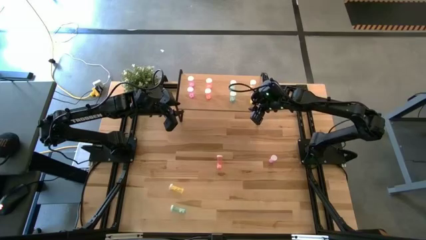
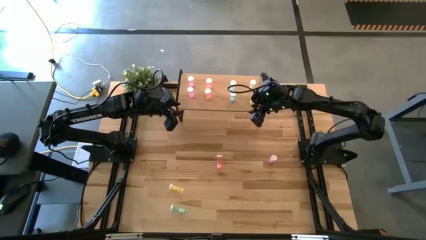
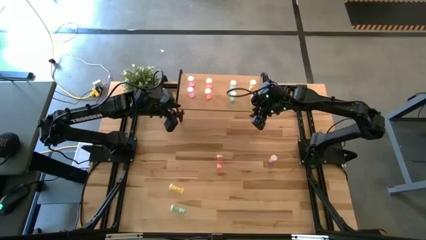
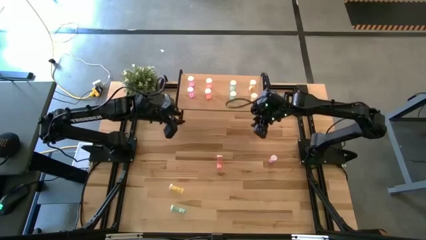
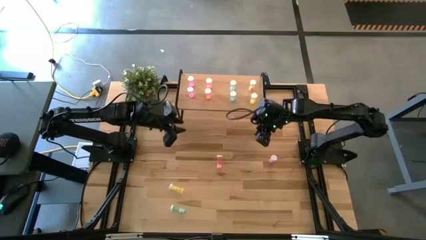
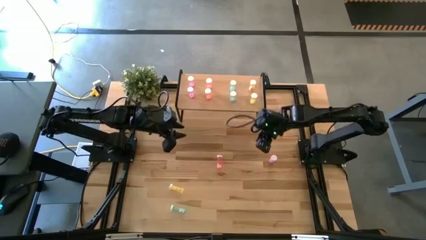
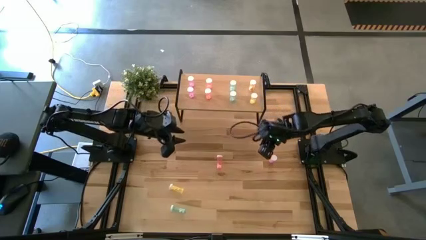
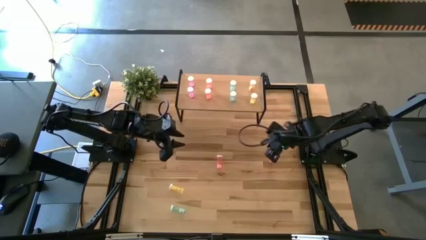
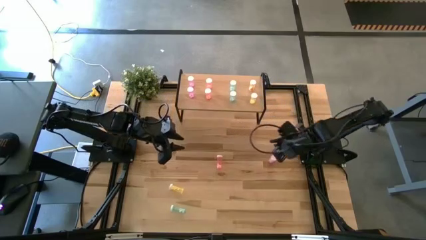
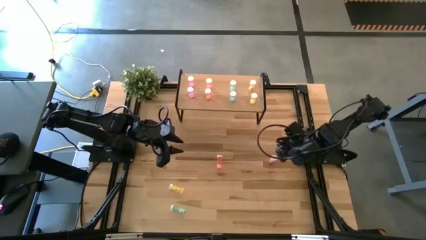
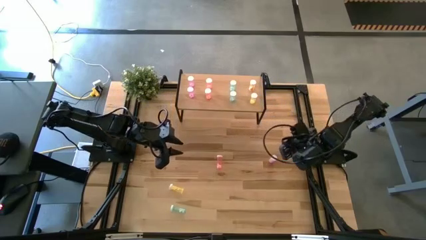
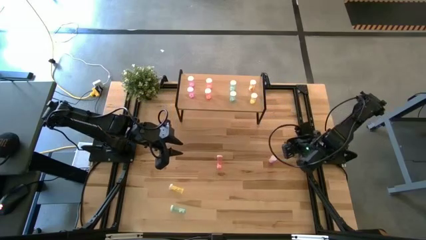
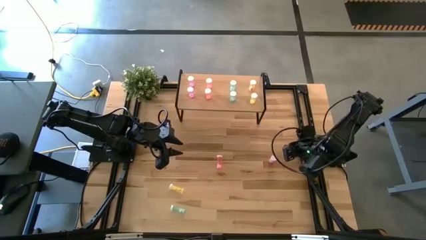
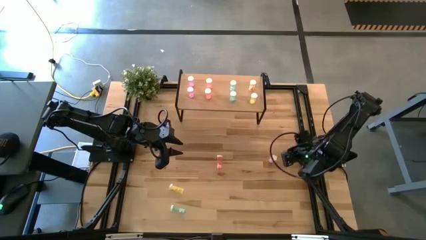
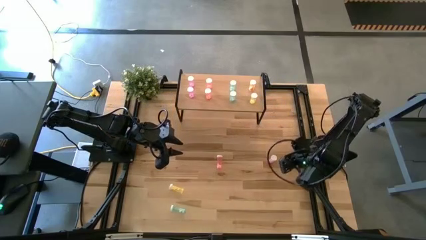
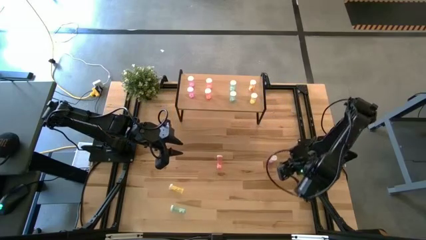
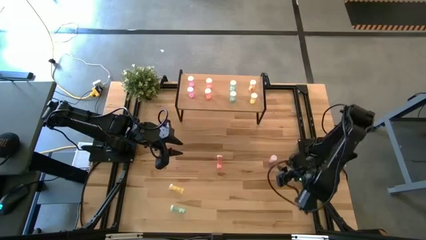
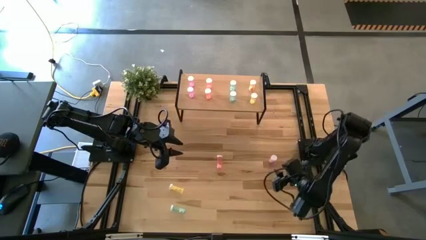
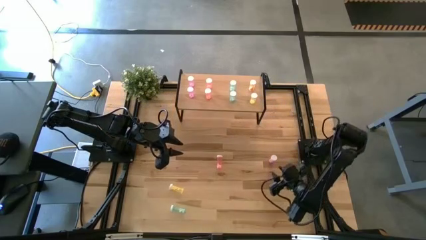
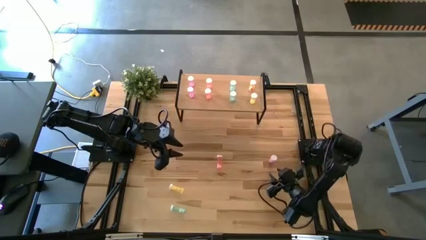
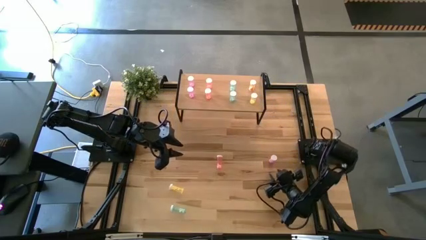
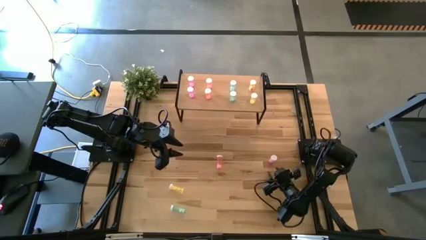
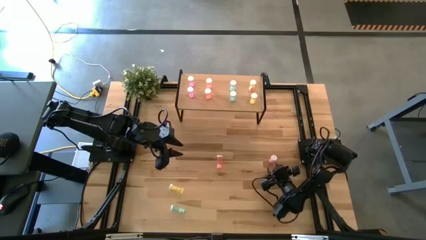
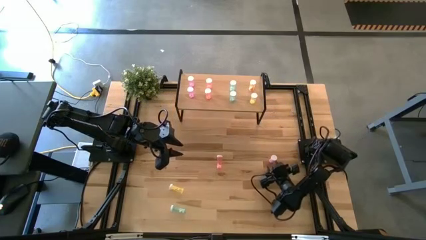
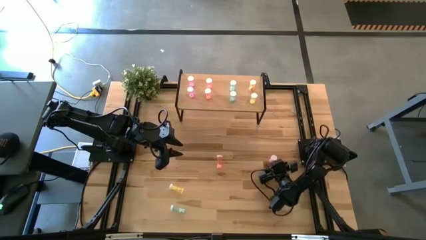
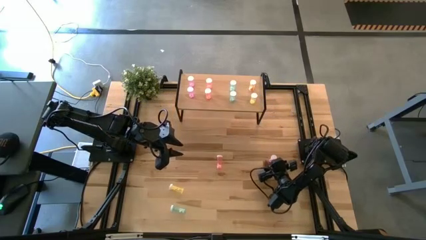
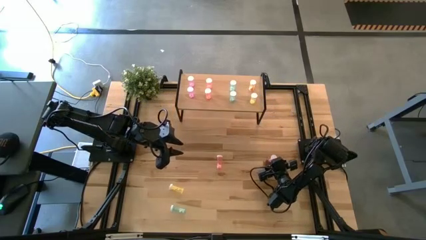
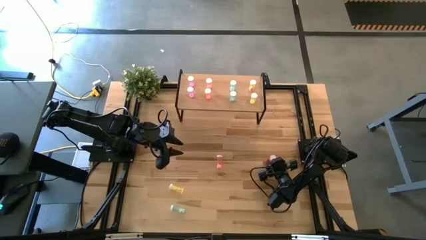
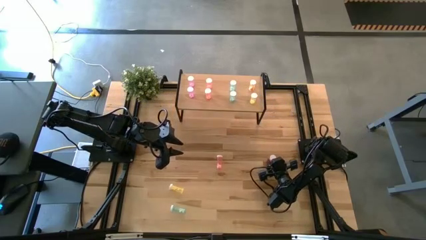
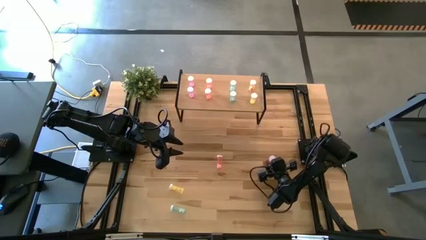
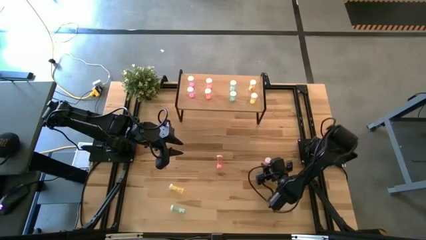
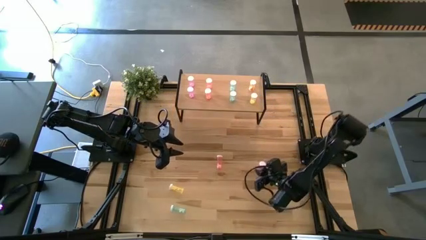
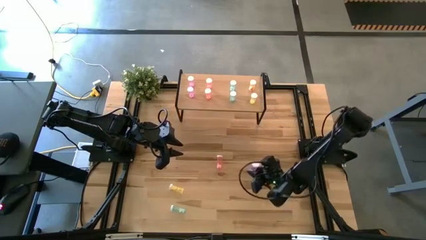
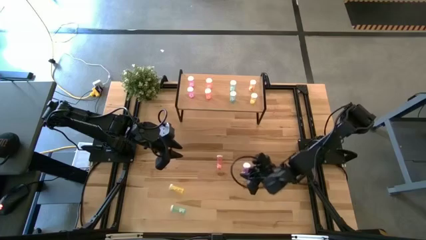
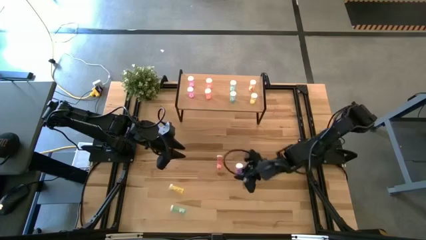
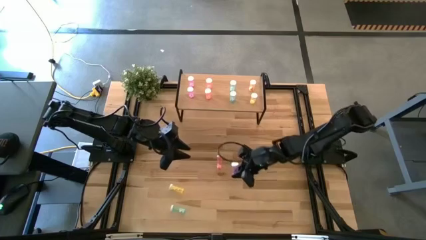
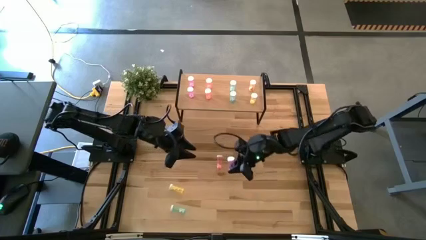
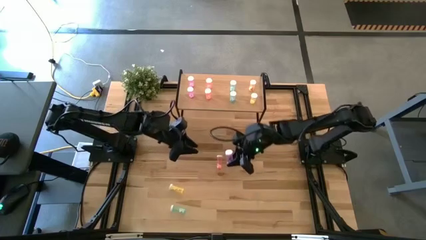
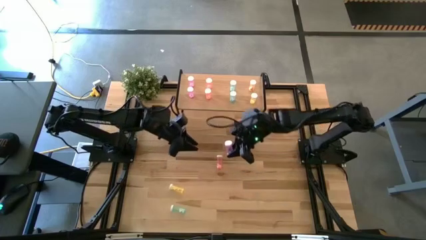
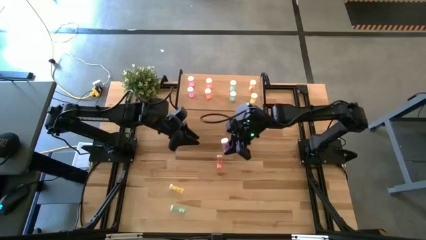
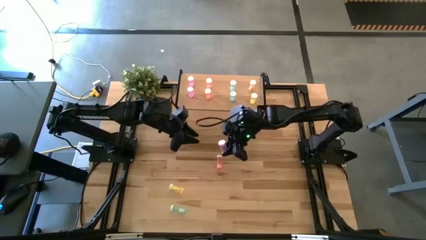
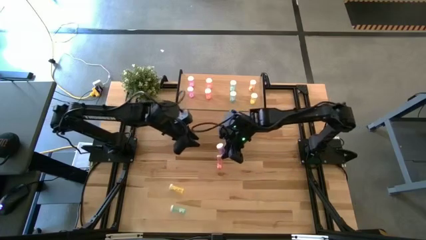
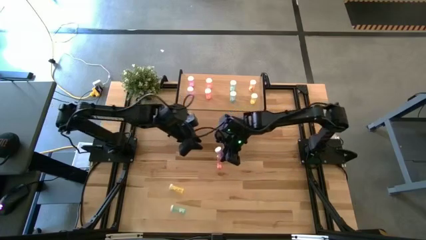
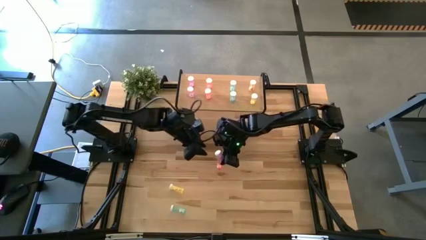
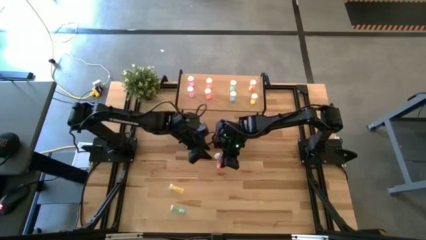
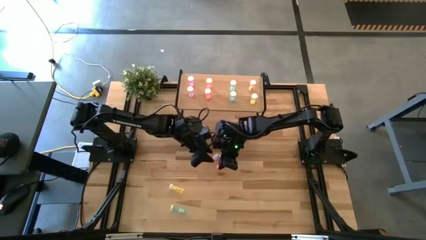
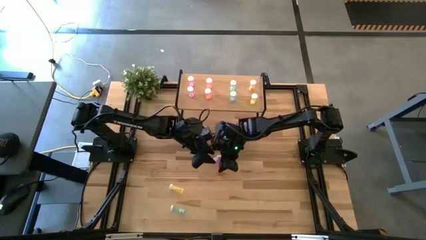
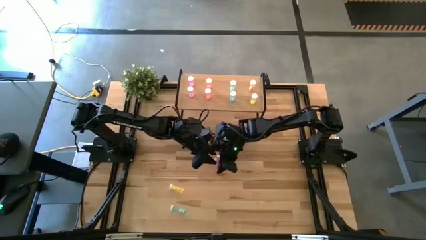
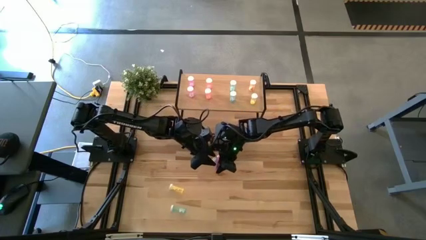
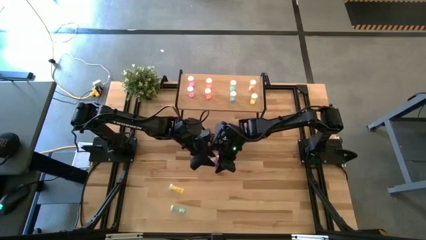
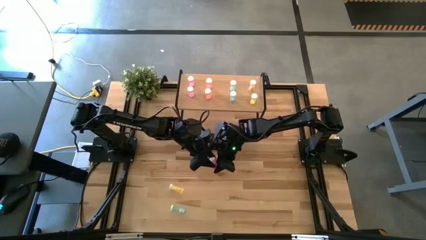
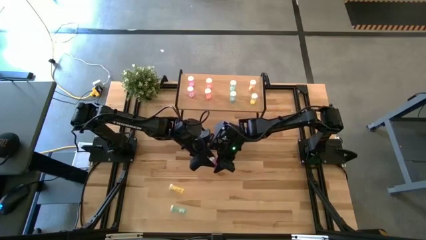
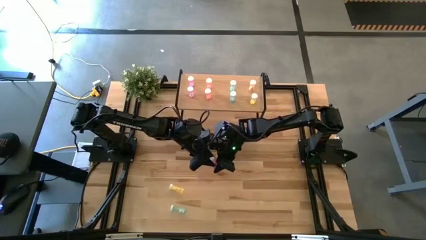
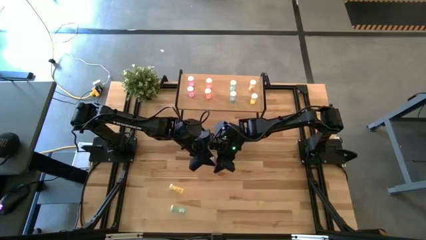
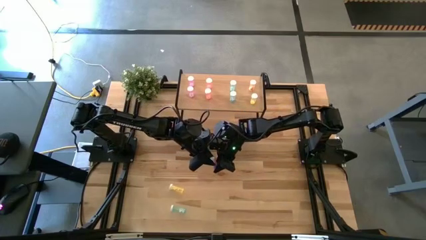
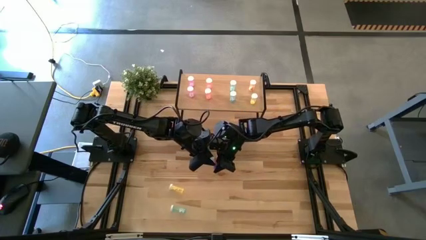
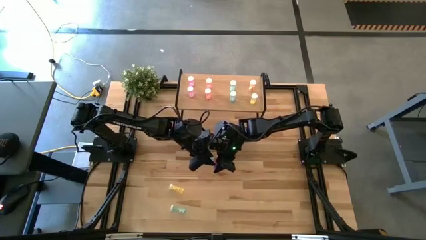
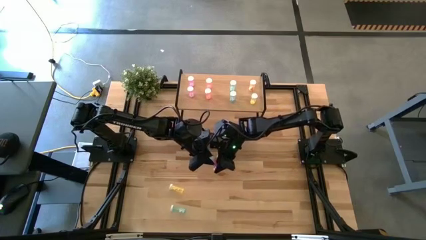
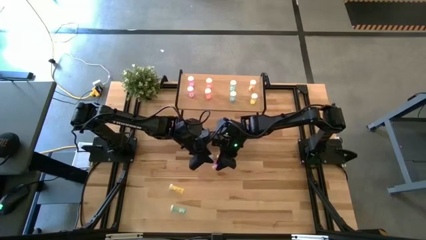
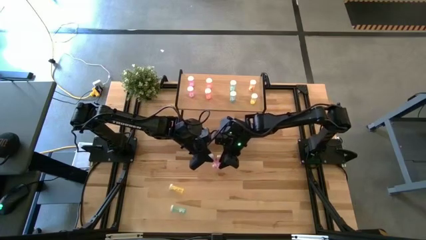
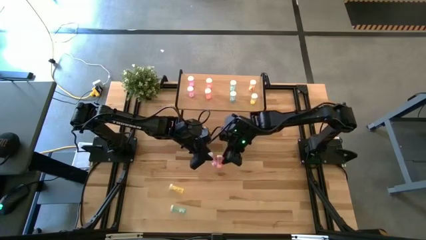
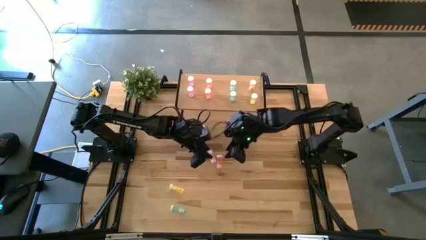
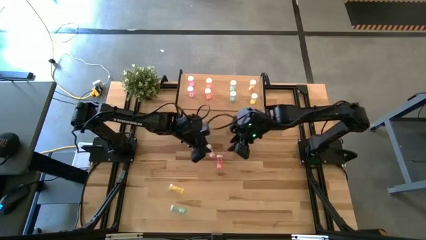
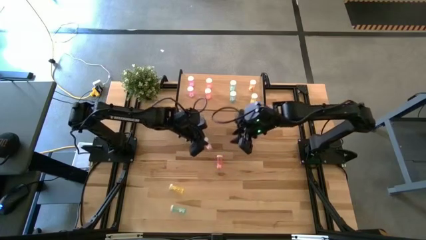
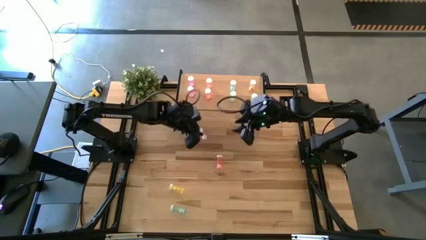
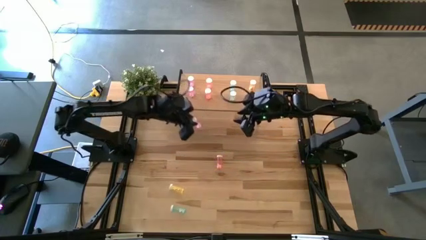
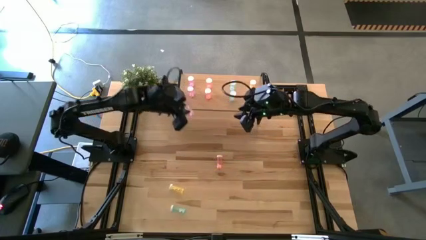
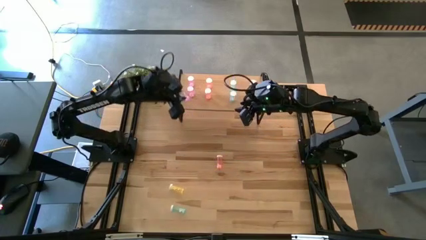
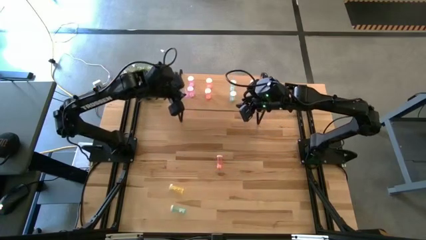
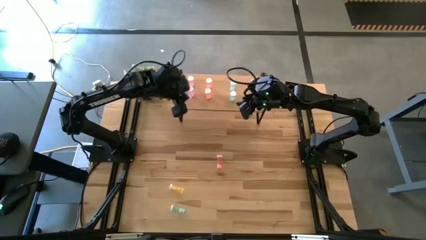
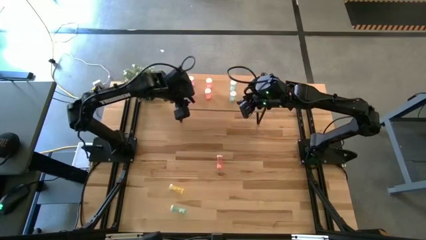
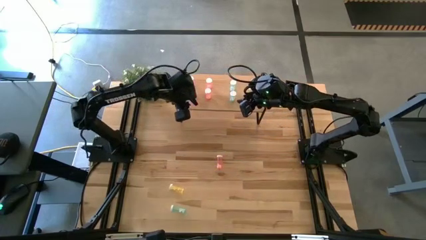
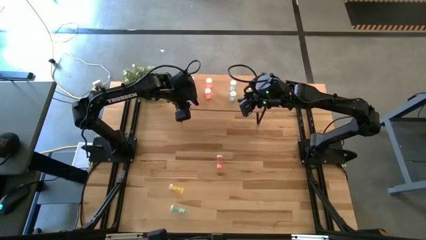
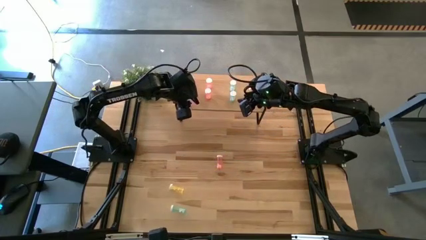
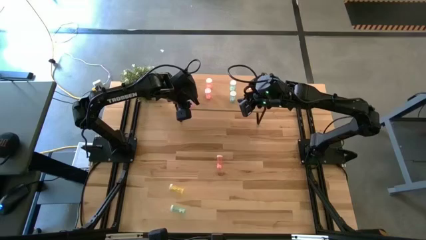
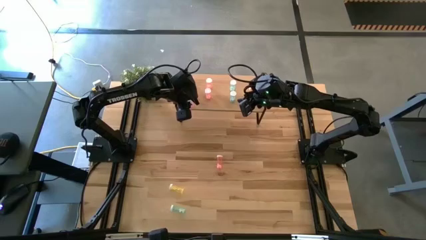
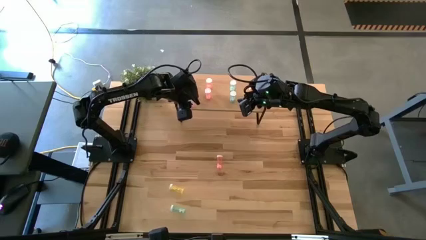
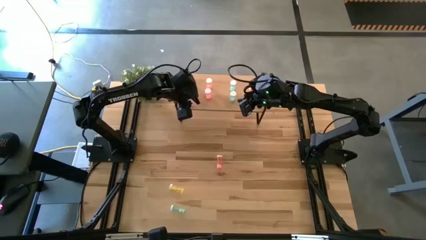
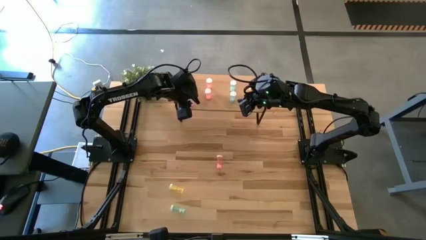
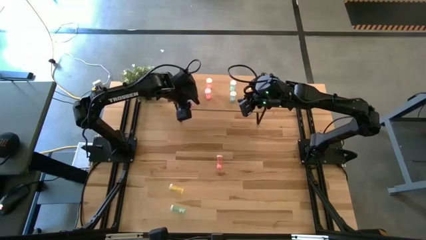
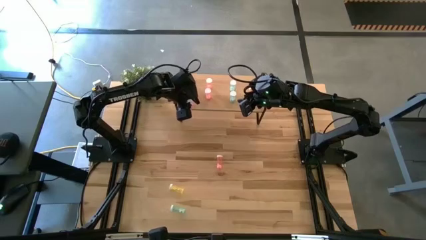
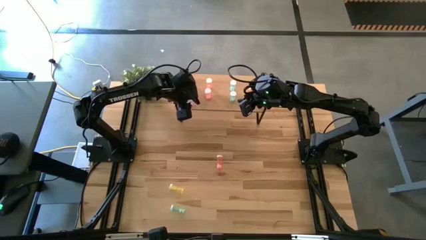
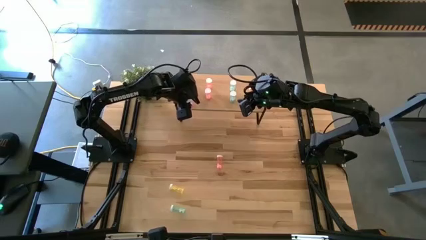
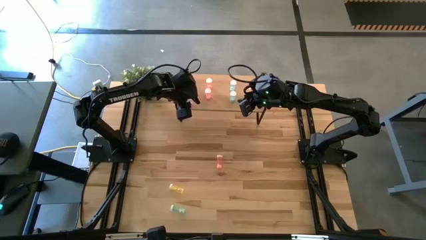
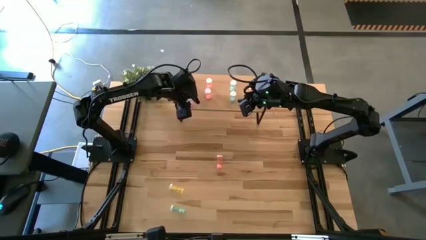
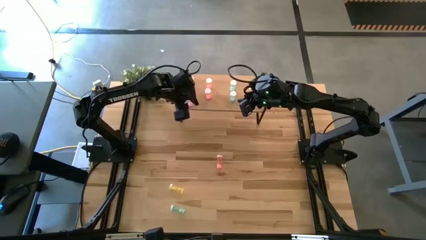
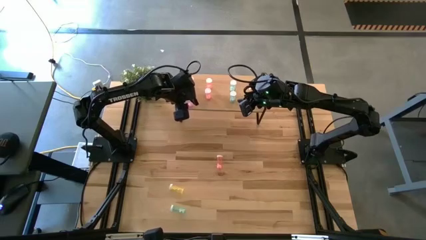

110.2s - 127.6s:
Task: Pick and place medicine bottles onto shelf by color
Put the purple pill bottle on the shelf aligned with the other purple pill bottles
